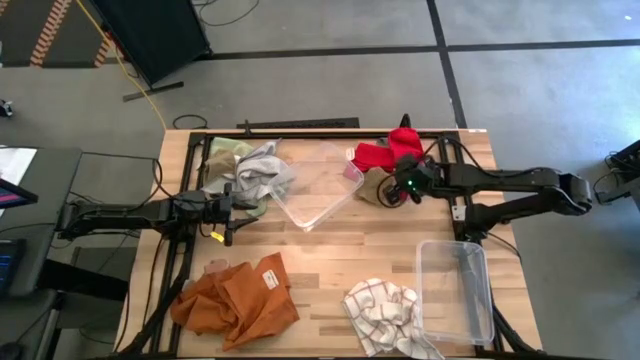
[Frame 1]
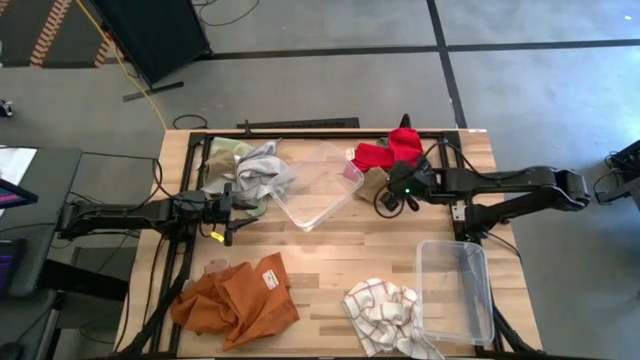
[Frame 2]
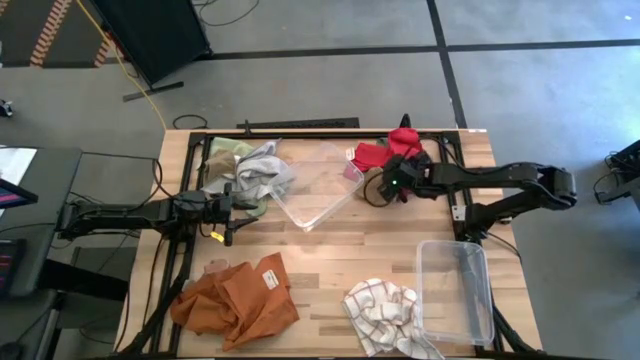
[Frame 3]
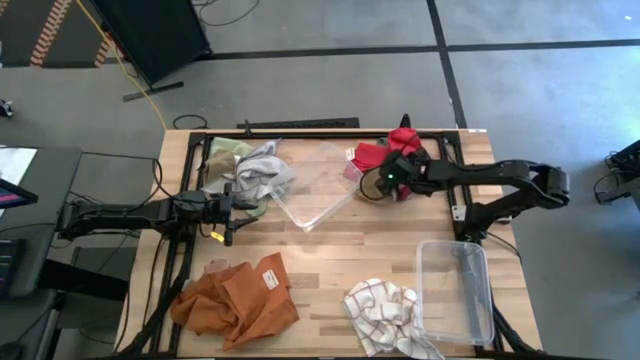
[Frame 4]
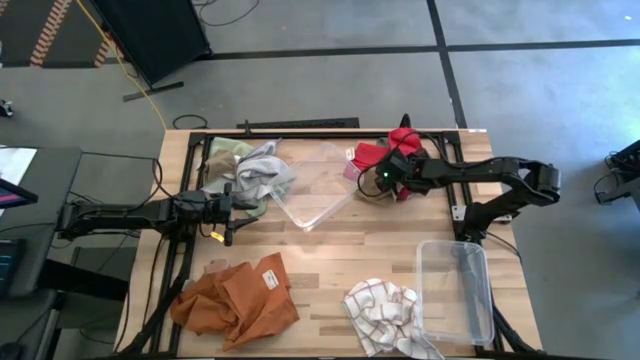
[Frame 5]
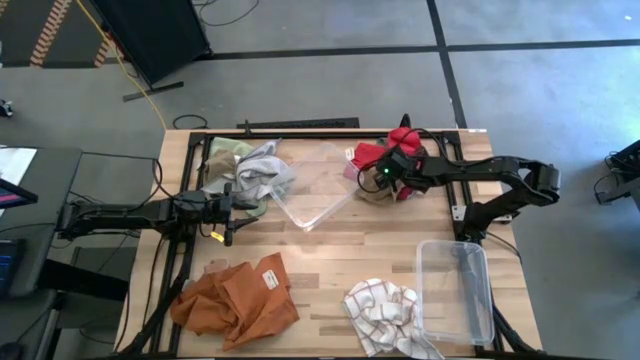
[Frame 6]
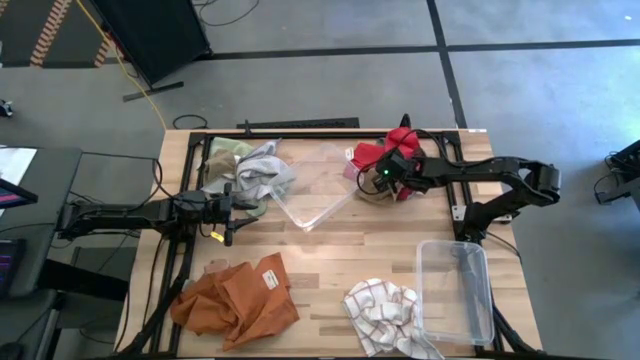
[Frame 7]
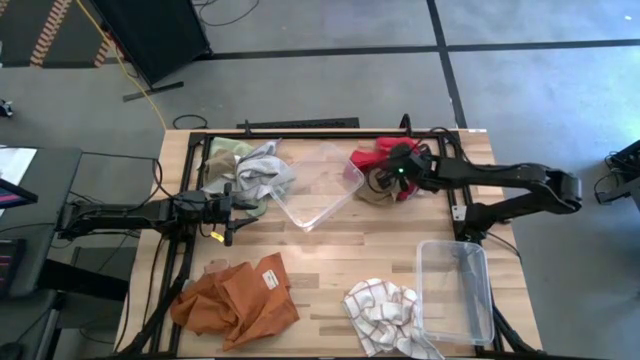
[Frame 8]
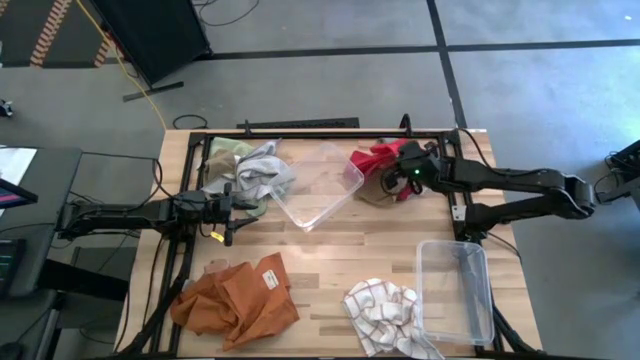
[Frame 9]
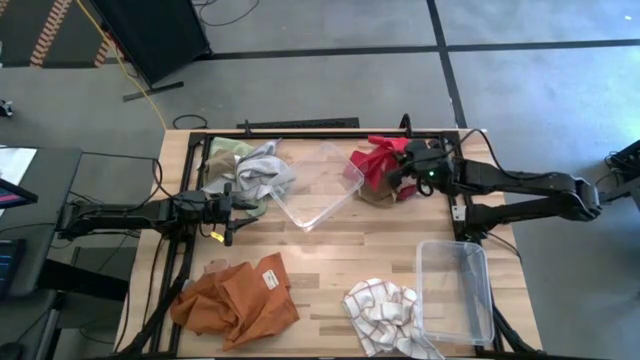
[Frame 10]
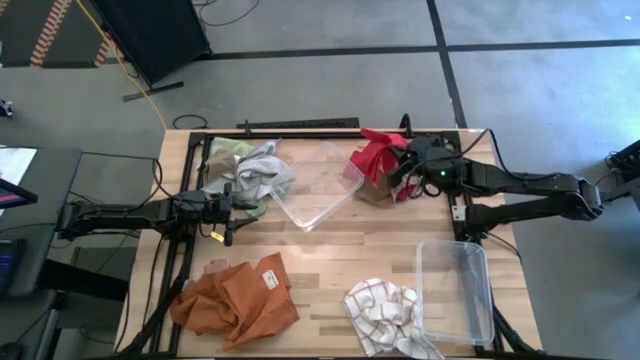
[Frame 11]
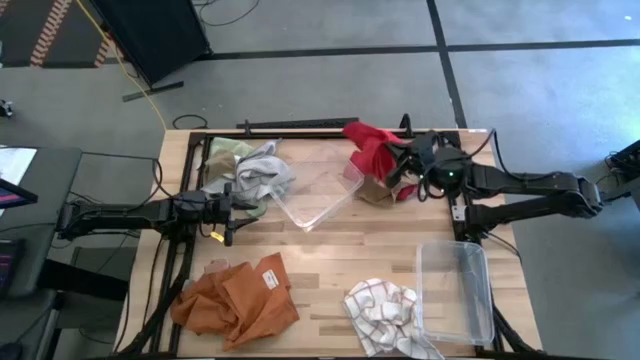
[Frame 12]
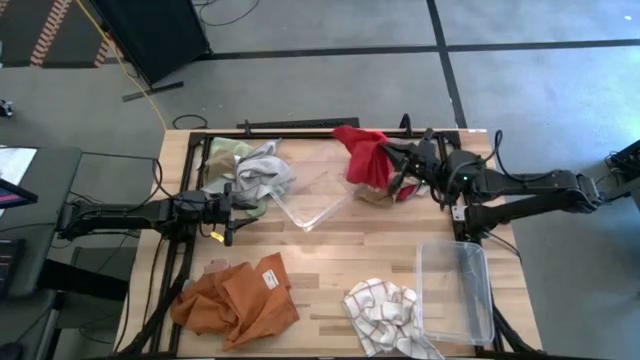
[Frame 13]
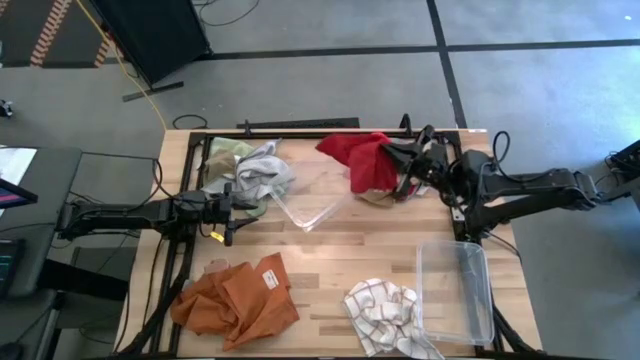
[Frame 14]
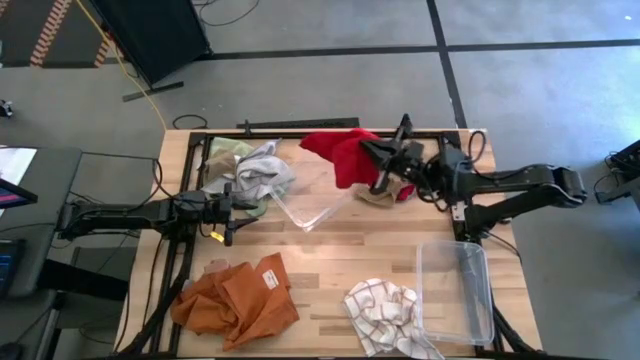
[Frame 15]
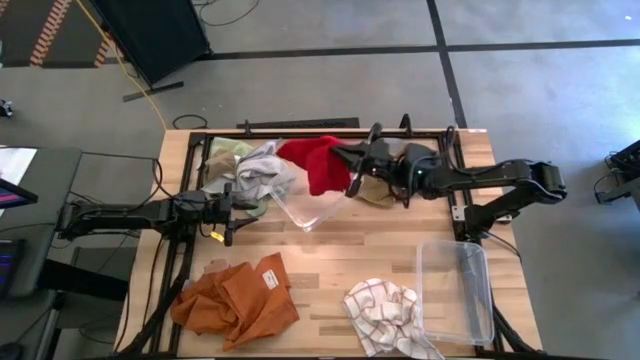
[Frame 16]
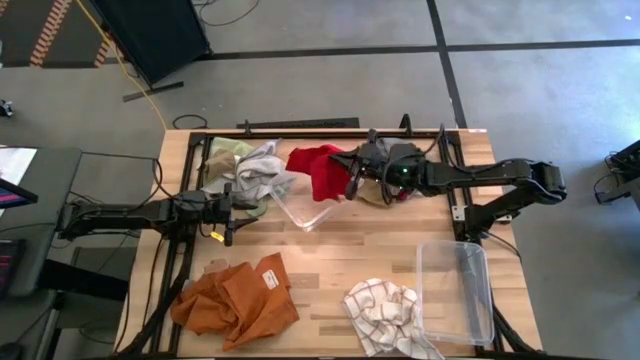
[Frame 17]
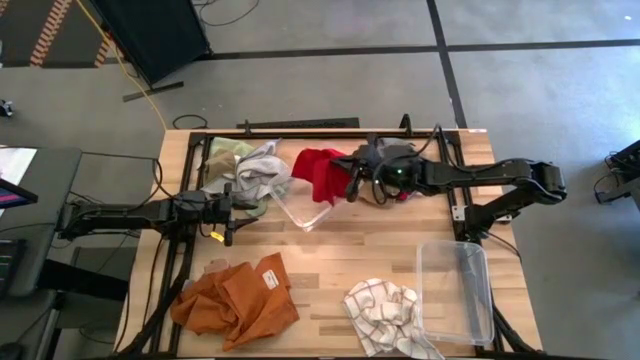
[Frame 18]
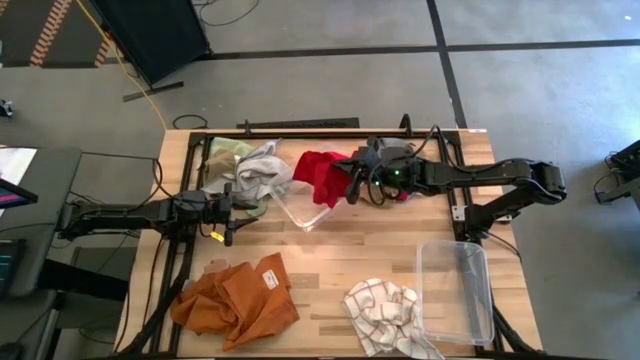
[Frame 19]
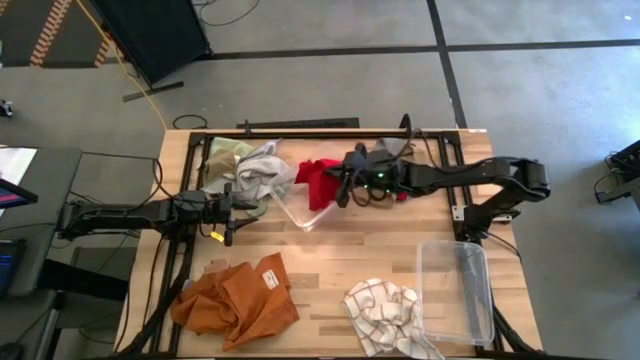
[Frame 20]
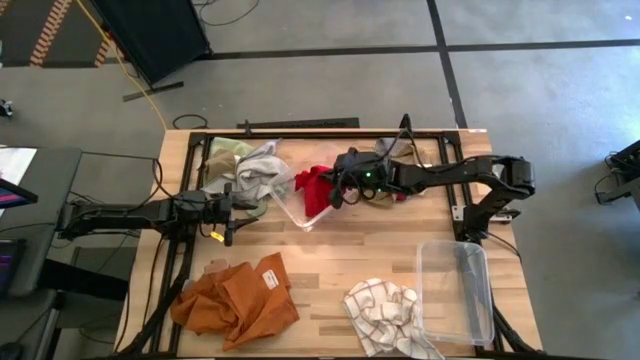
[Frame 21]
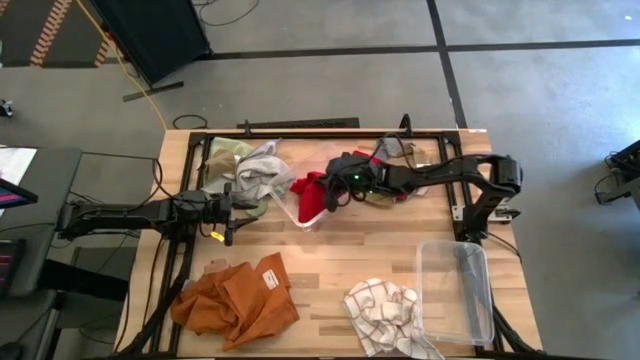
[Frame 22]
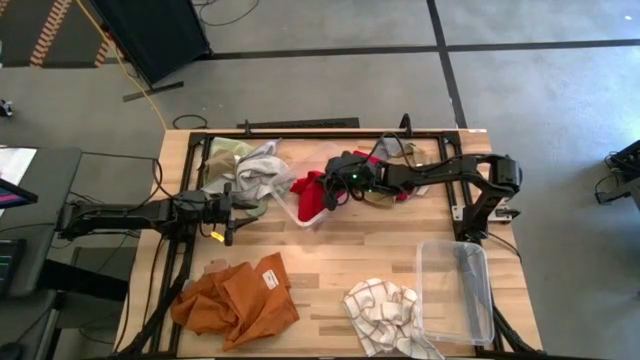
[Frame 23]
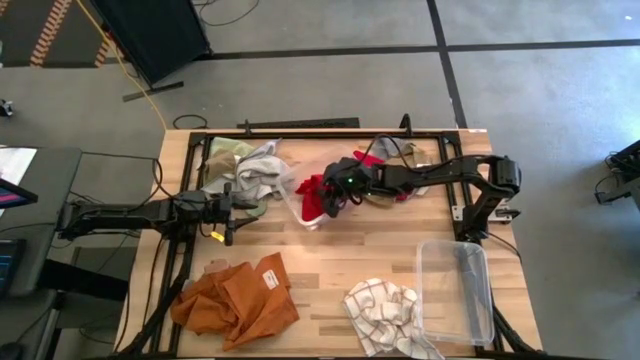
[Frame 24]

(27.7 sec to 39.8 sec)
Task: Sort towels by color in basket
Put the red towel into the top transparent bin

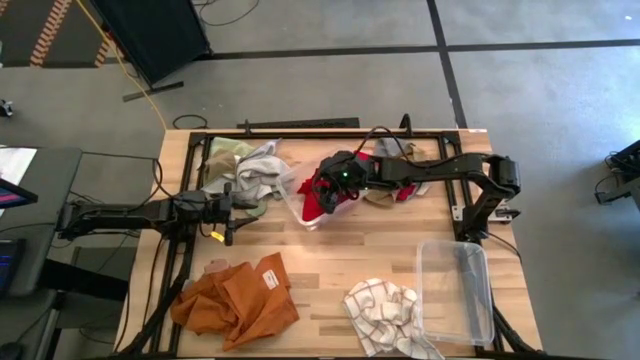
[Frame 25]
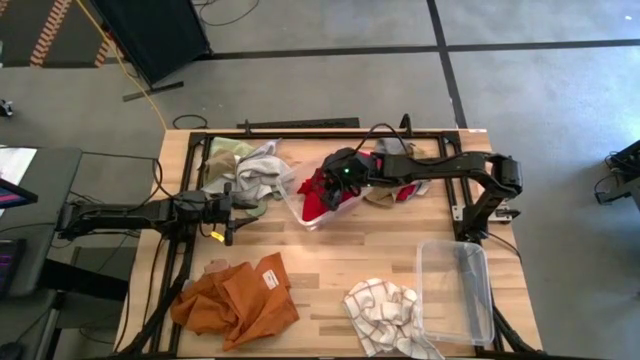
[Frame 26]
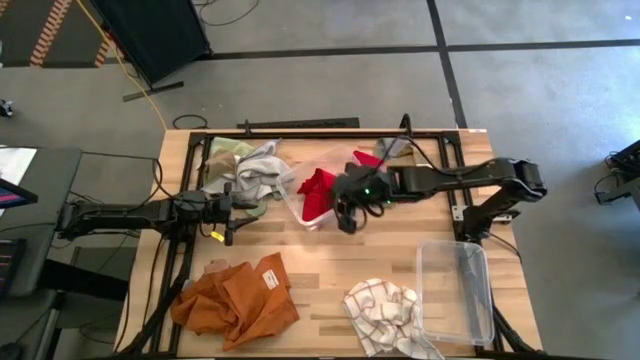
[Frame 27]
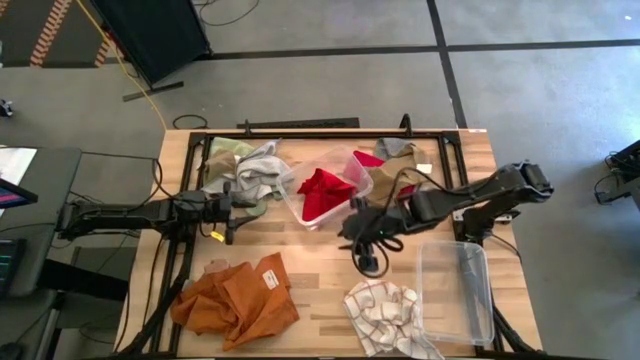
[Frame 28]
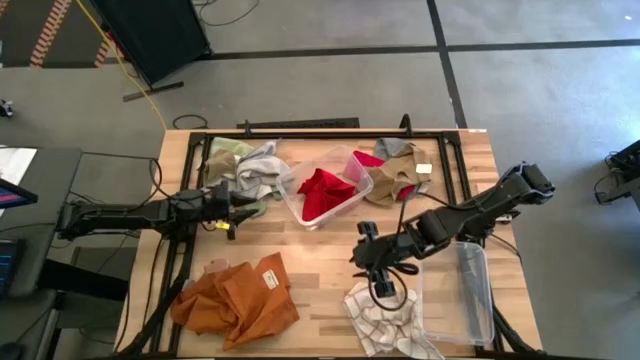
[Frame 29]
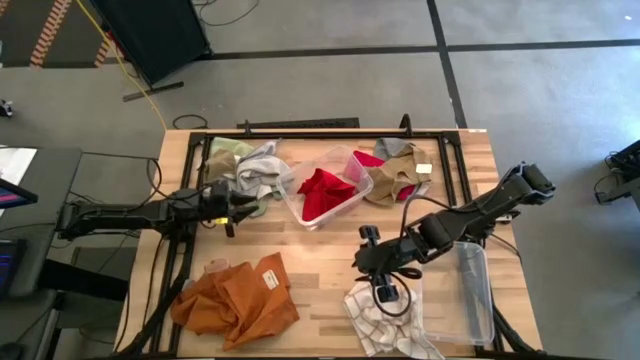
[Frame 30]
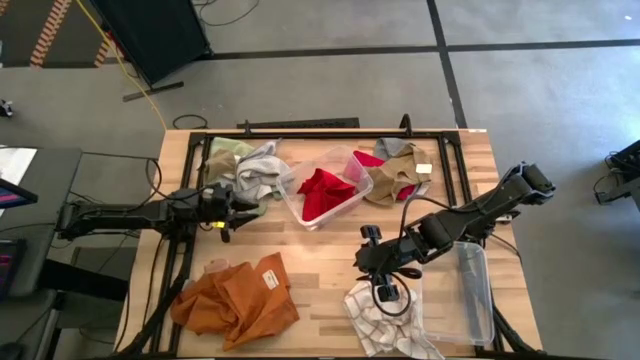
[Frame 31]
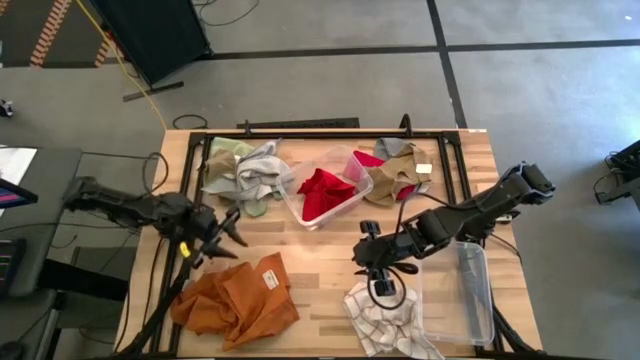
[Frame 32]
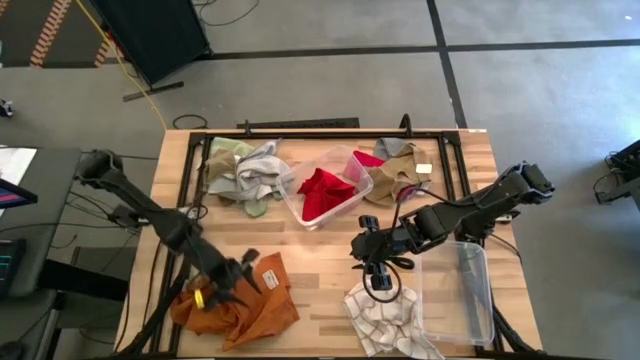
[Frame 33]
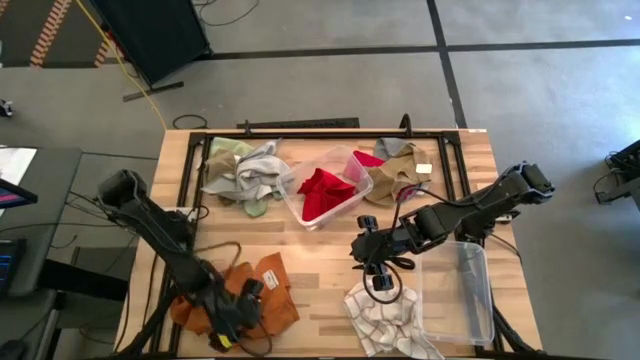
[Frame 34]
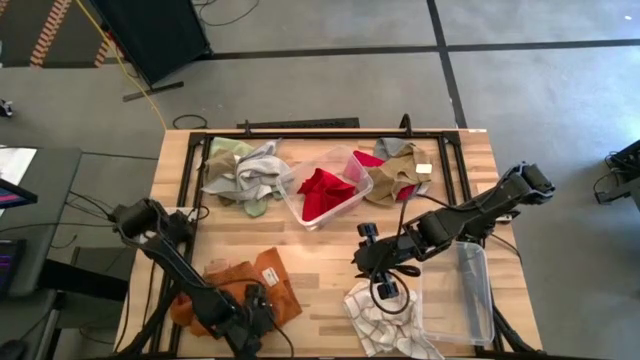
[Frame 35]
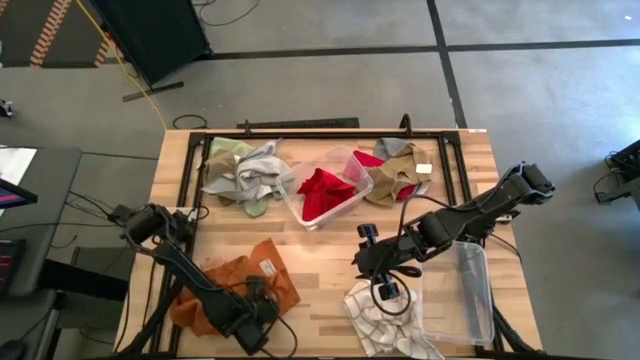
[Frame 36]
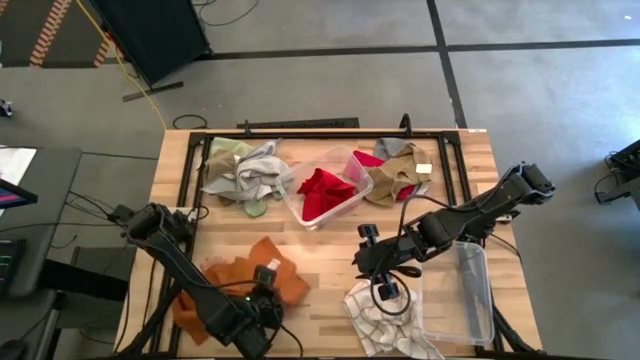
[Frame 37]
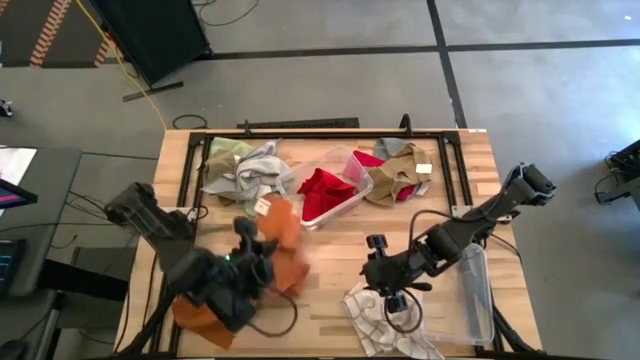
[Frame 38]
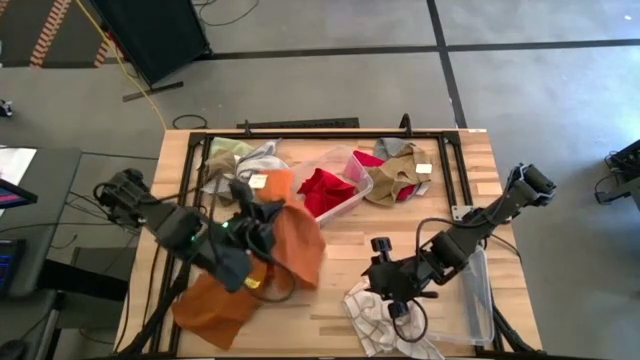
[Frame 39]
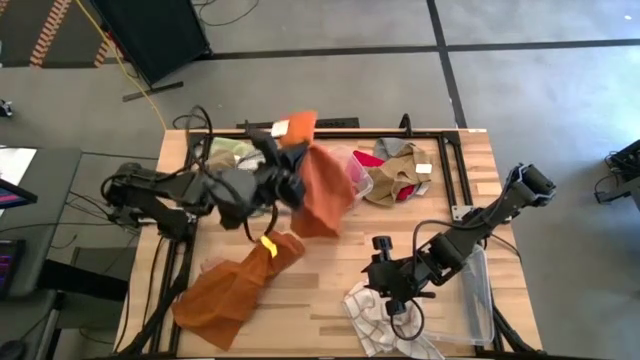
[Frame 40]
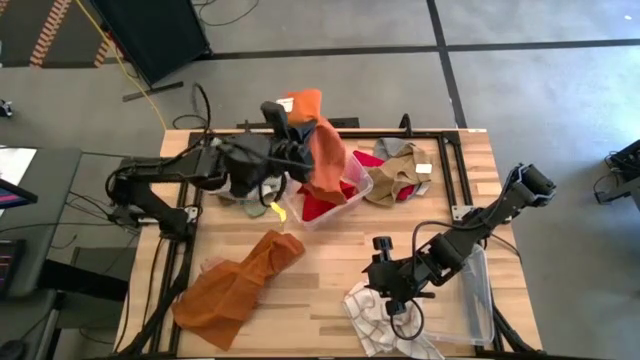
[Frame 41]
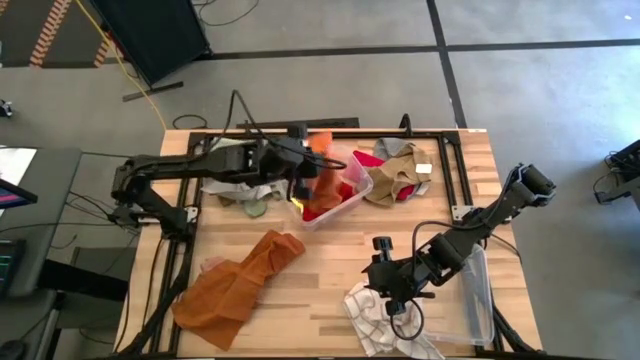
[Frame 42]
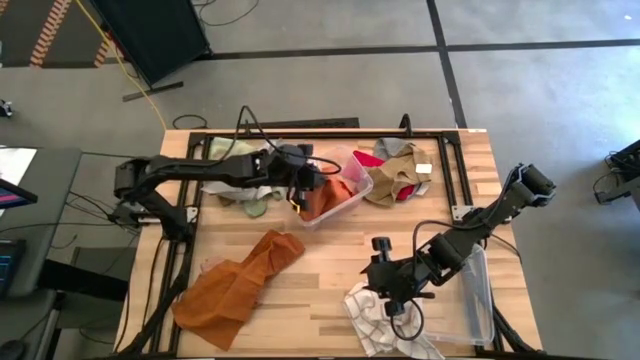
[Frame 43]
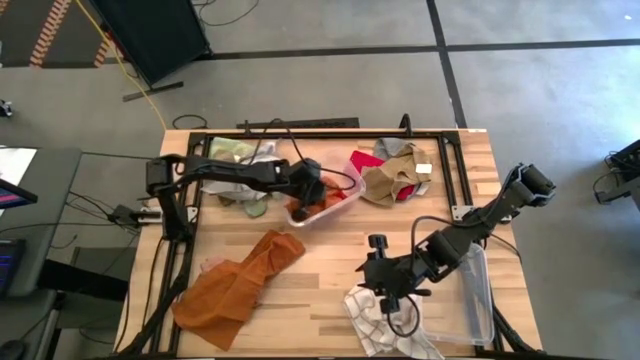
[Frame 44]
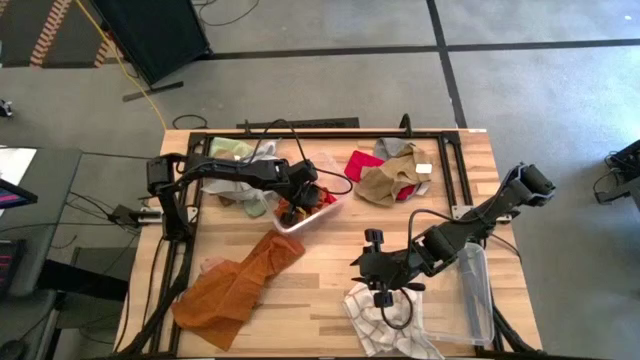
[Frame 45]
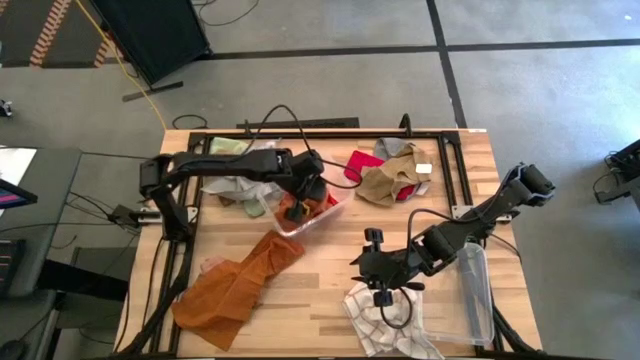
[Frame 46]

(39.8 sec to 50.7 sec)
Put the orange towel into the top transparent bin
